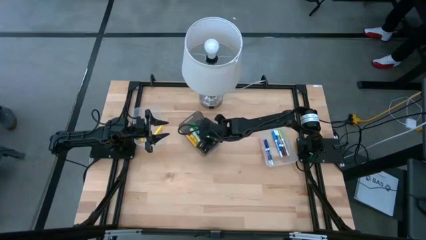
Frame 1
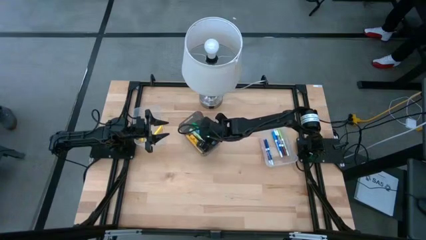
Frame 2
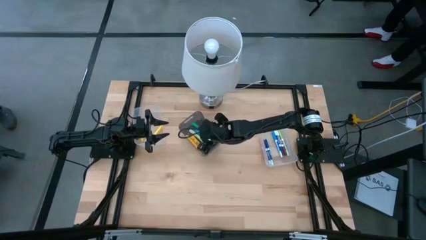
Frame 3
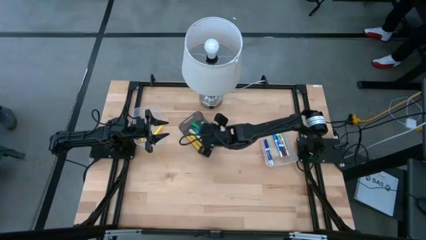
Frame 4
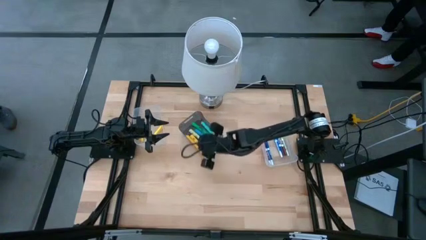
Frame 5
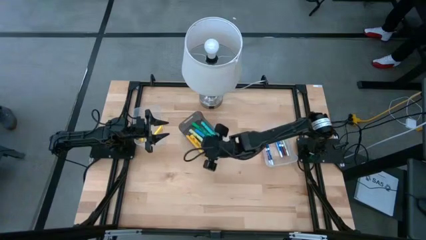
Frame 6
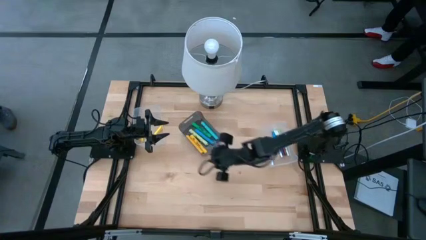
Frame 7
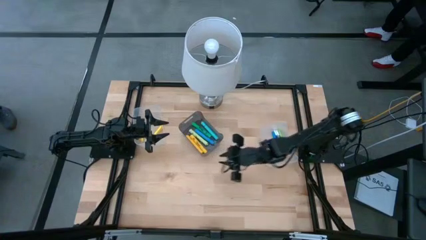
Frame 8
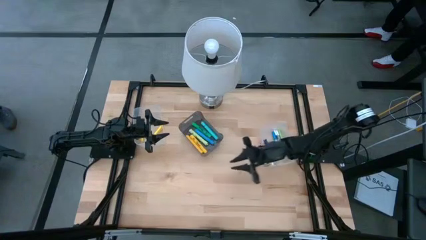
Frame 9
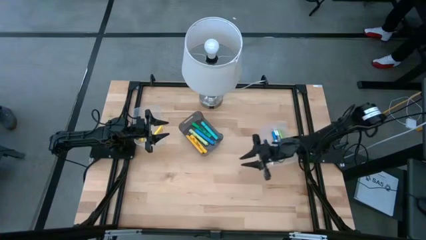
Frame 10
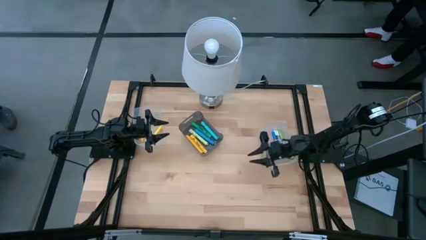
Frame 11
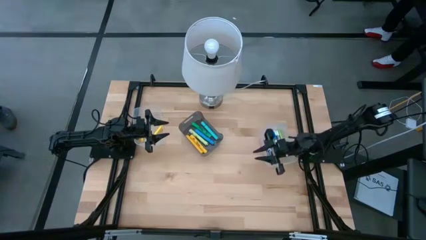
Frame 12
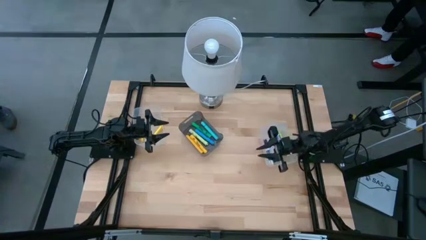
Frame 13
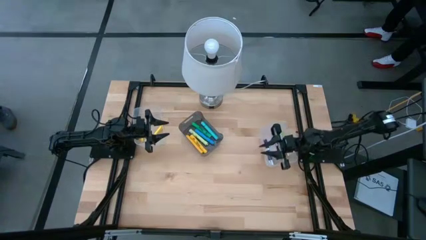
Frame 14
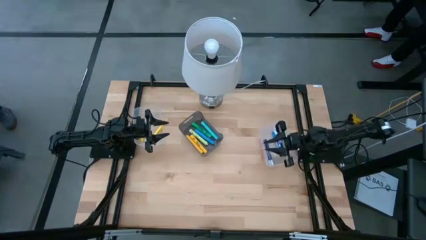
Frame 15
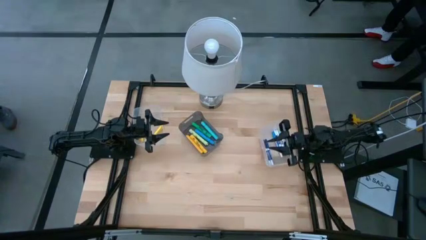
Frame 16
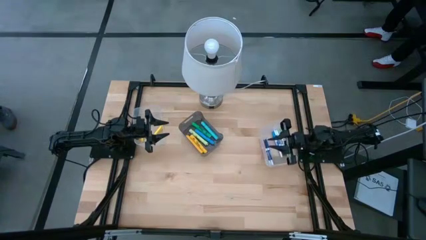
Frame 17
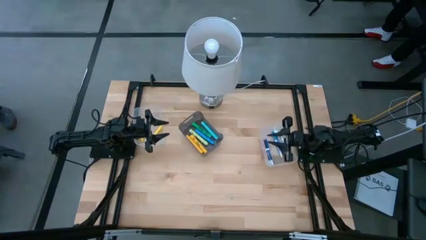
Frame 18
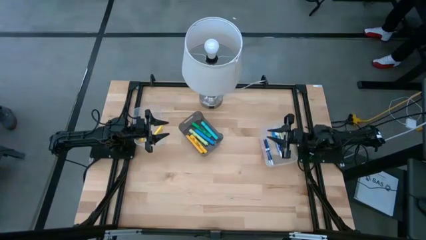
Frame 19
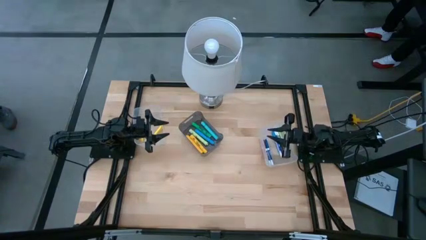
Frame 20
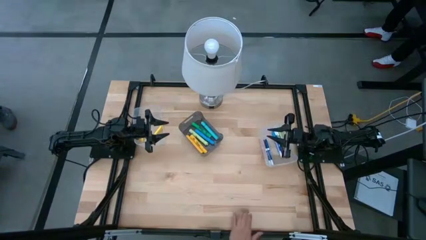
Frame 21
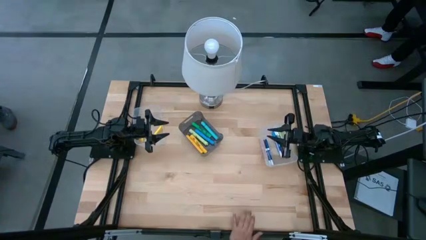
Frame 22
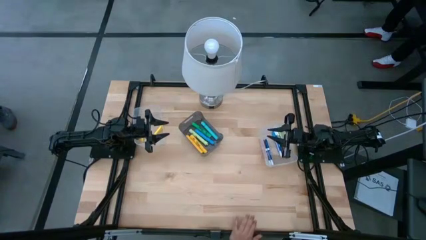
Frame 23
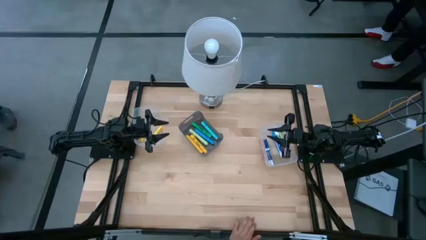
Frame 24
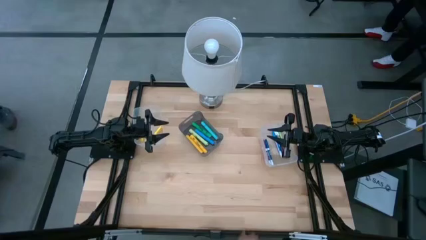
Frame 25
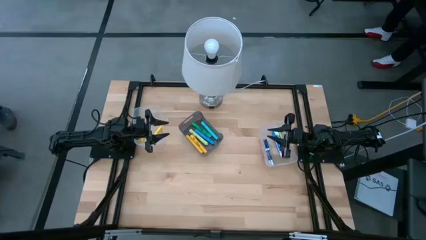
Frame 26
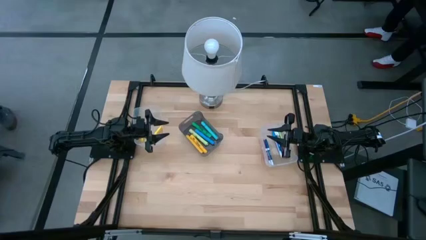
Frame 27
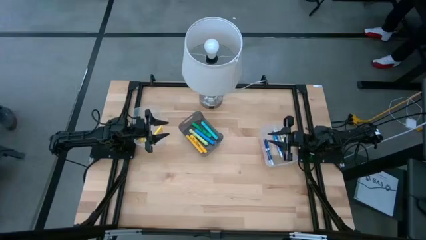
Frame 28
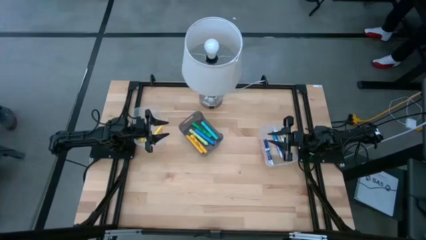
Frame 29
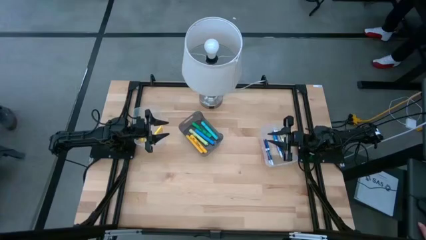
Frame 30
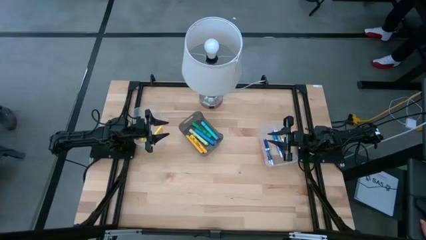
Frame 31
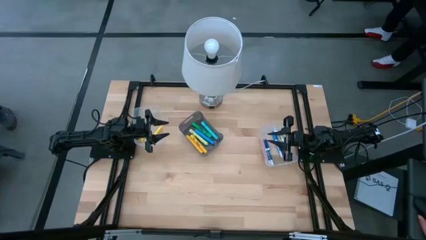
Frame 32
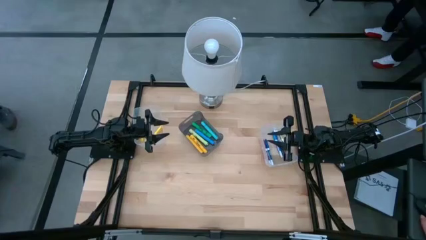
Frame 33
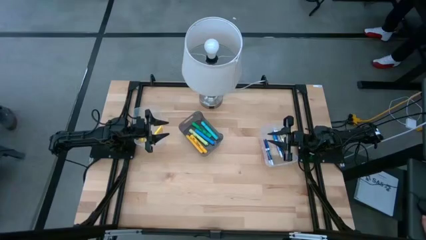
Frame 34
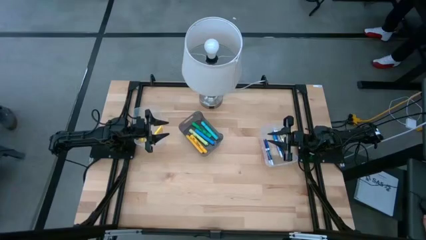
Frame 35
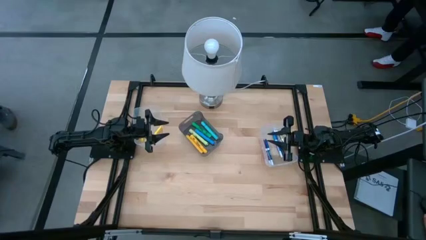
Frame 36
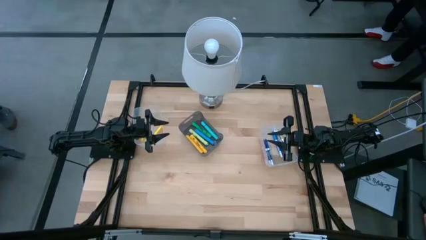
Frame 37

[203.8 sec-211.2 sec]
Task: Pick & Place Markers
Return to Home Position

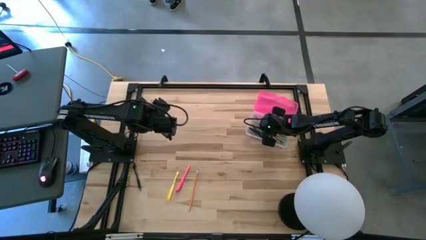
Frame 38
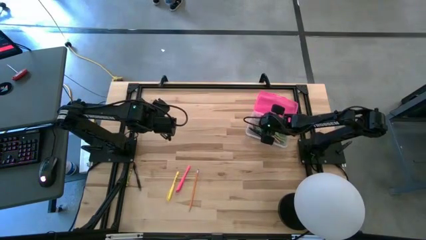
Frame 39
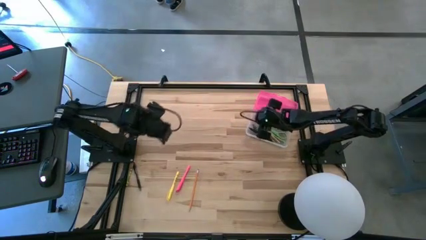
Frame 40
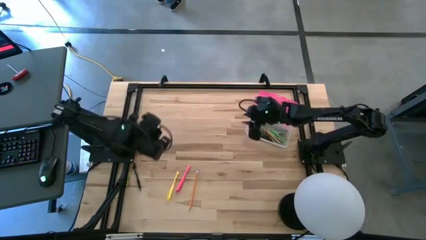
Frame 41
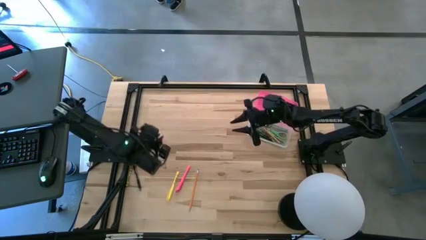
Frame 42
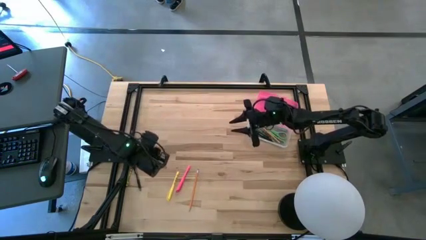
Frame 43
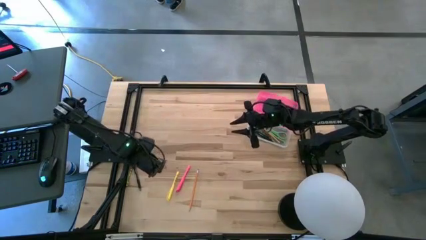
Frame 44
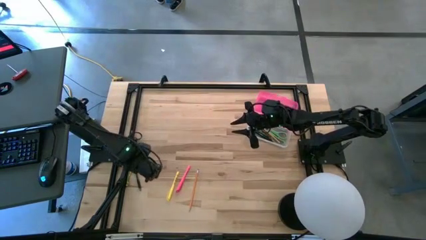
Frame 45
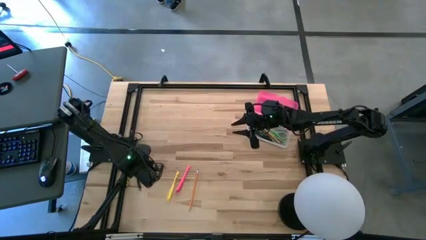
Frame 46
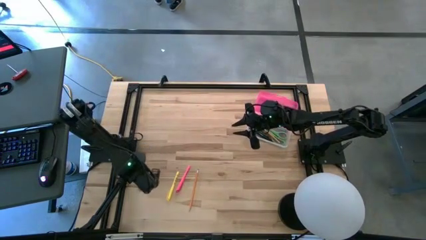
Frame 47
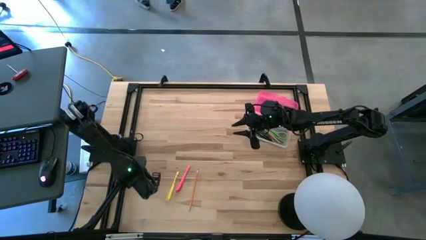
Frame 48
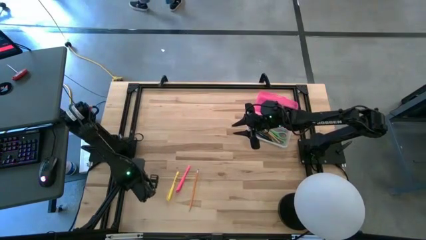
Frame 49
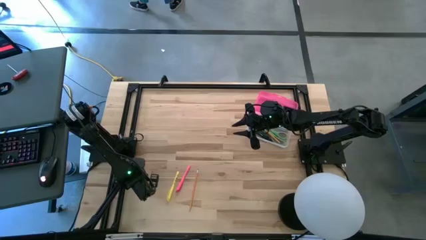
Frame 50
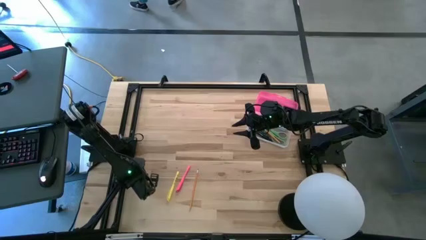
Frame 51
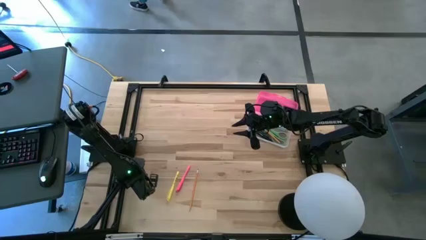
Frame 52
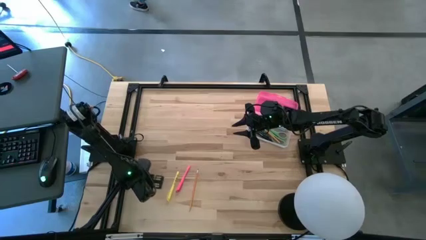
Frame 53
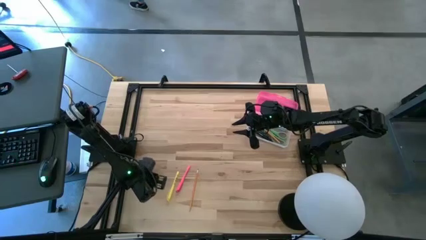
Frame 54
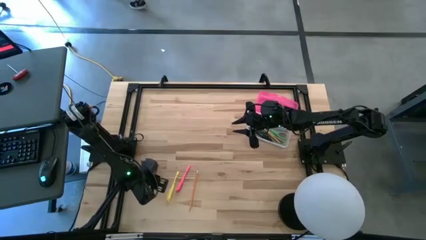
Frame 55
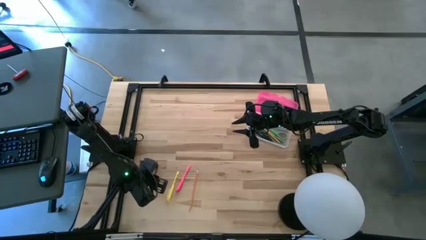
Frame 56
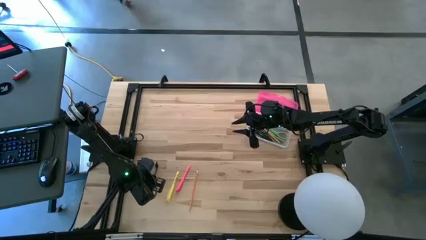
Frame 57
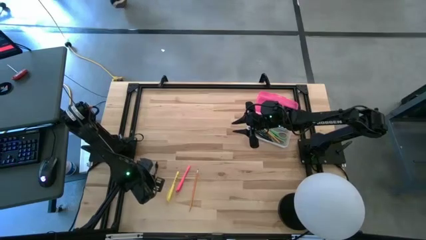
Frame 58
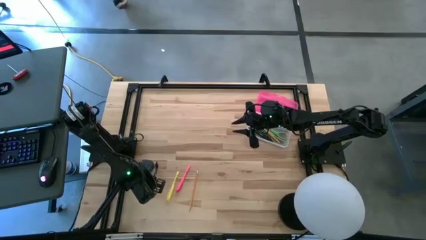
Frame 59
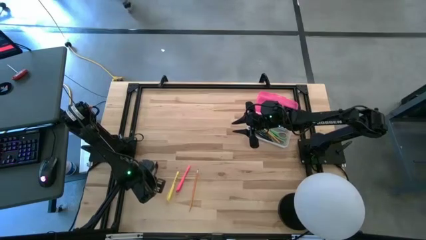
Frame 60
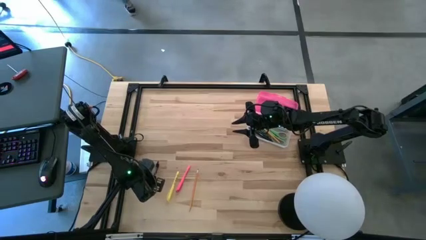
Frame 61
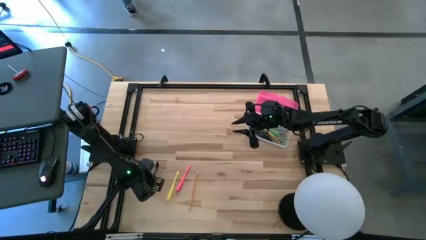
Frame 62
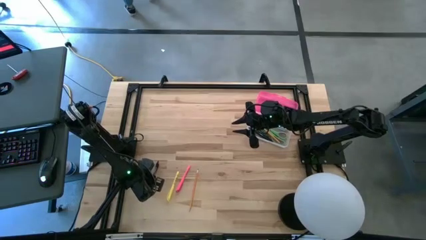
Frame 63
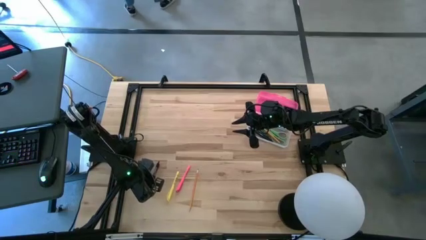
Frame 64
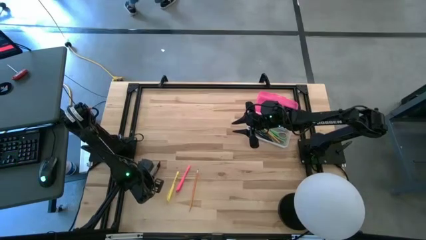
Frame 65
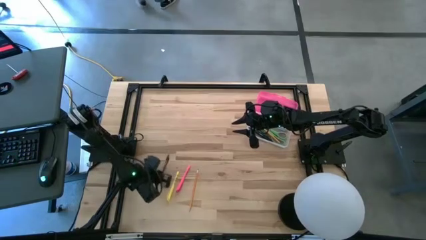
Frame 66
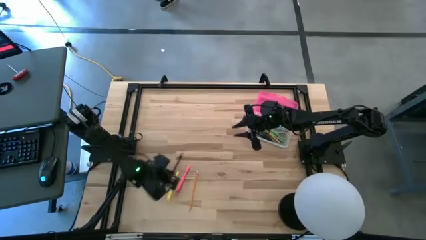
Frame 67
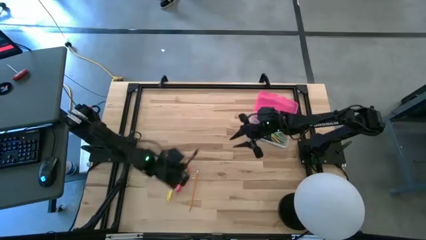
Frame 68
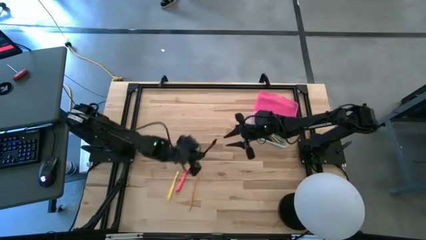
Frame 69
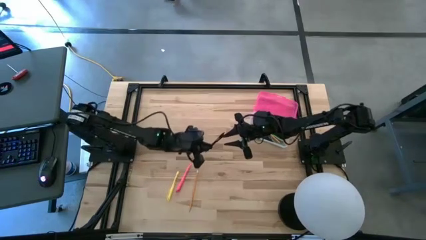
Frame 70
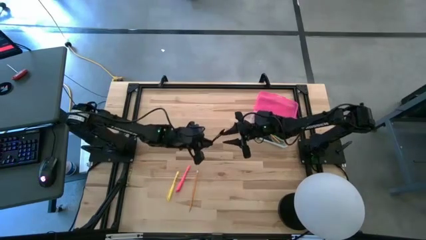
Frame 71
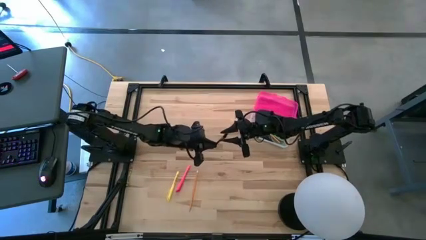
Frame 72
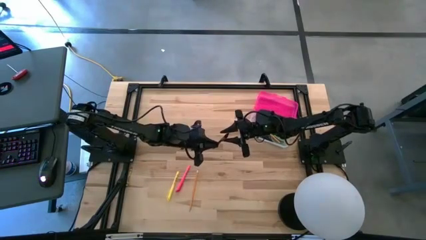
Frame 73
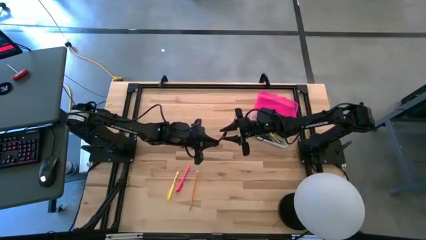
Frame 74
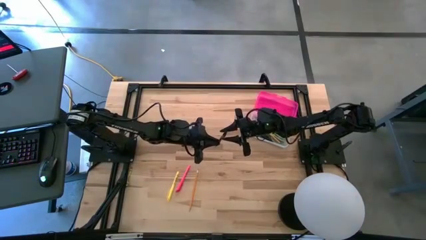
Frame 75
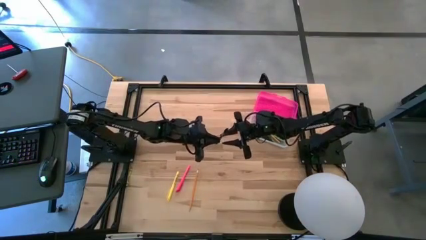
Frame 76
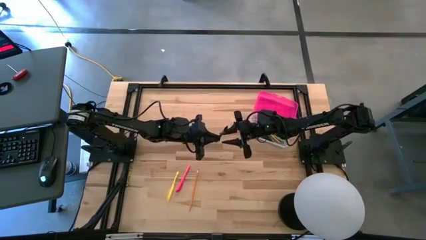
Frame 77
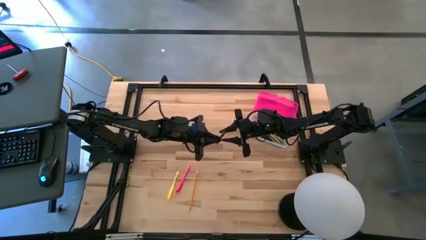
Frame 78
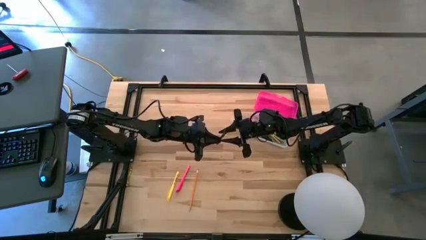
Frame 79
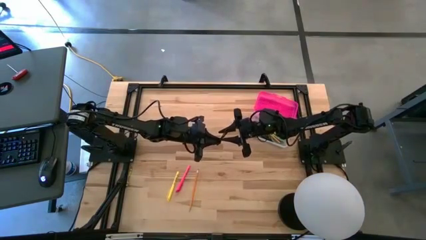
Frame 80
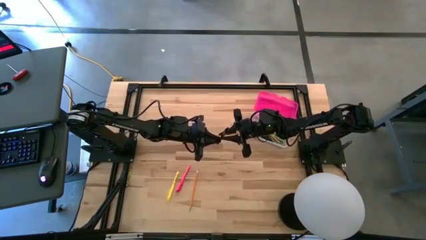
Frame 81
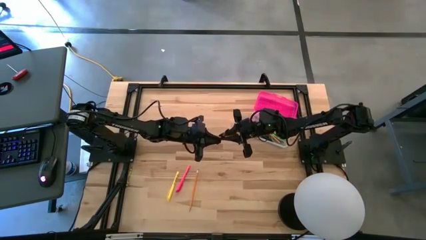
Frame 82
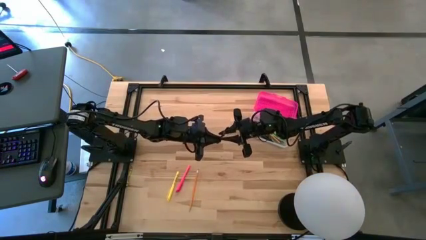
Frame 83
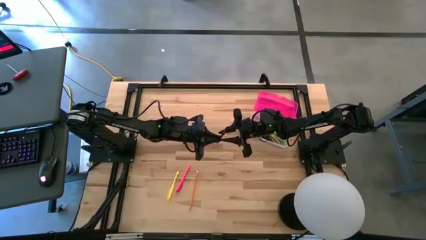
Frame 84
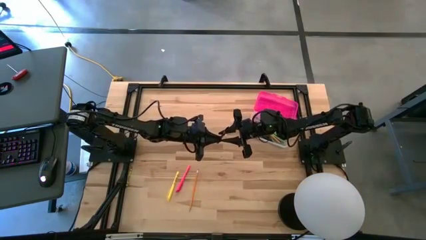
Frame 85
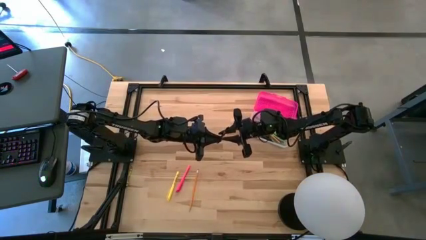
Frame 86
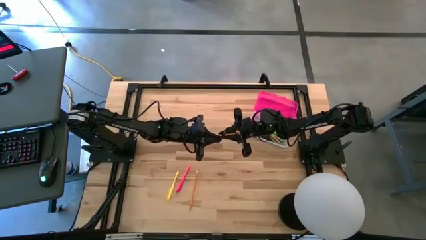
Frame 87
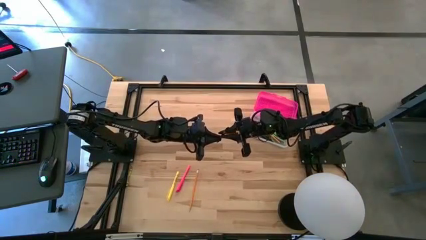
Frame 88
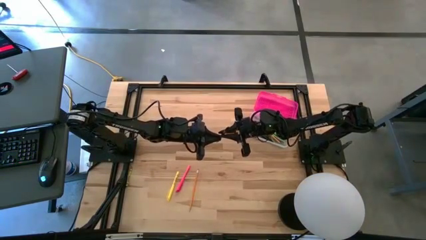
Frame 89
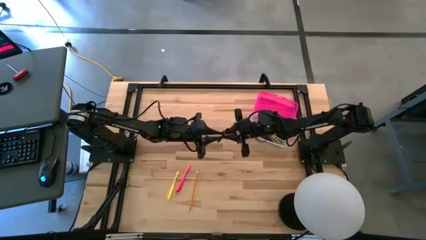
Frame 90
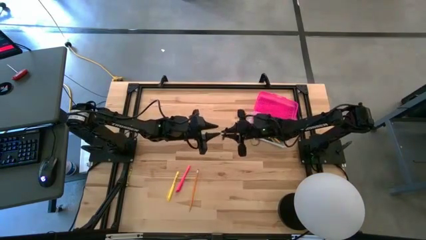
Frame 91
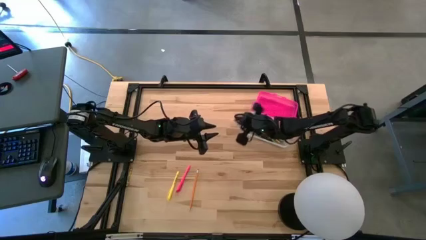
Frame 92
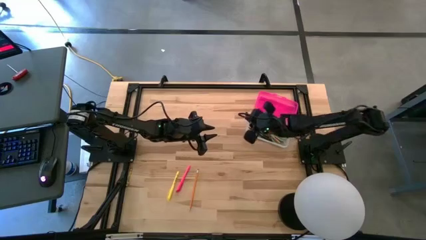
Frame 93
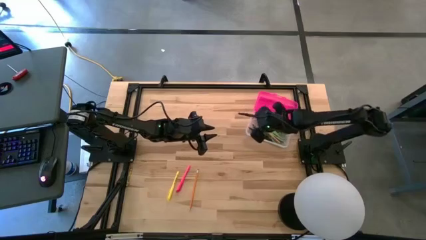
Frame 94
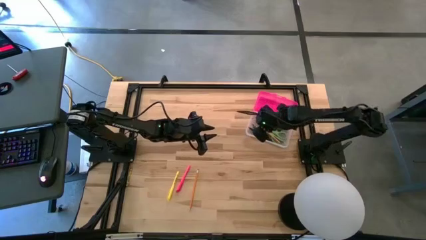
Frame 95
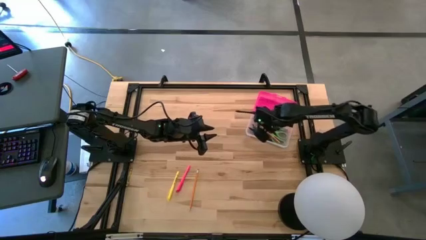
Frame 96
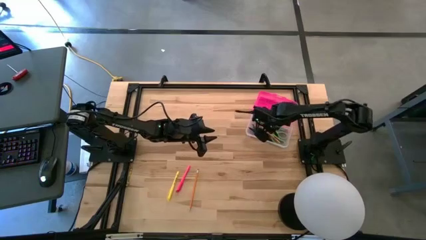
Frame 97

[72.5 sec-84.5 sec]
Task: Pick & place school supplies into a supply box
Put the black pen into the pink supply box
